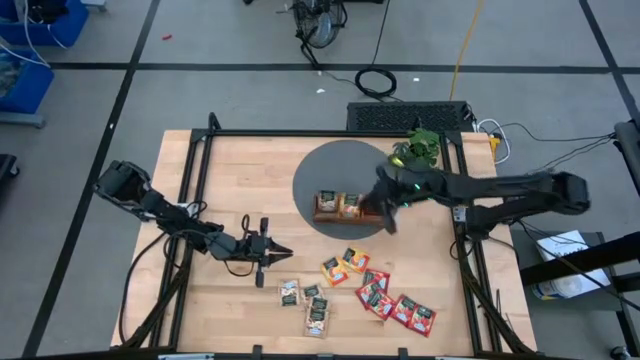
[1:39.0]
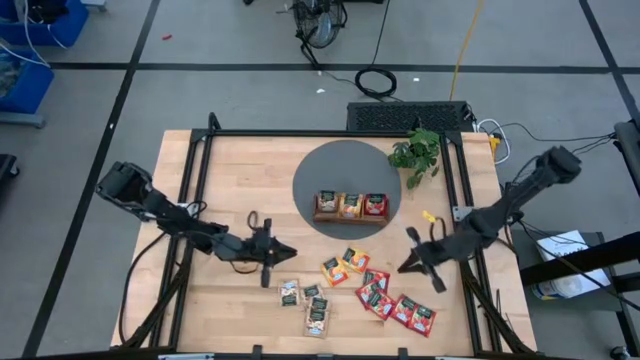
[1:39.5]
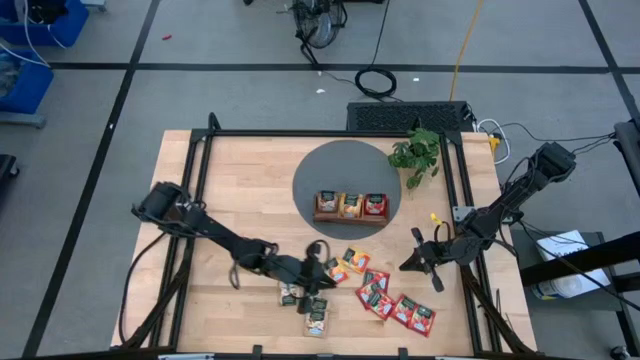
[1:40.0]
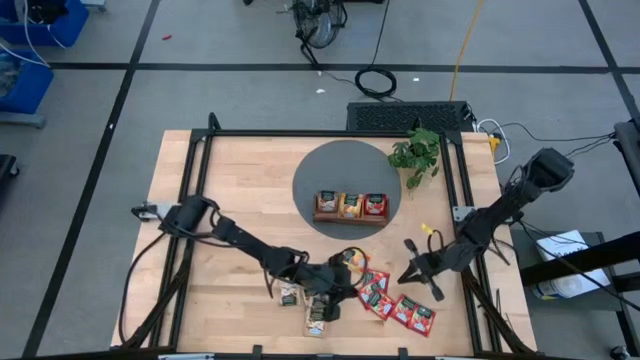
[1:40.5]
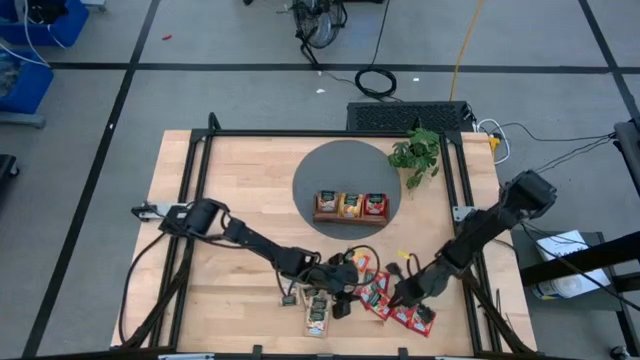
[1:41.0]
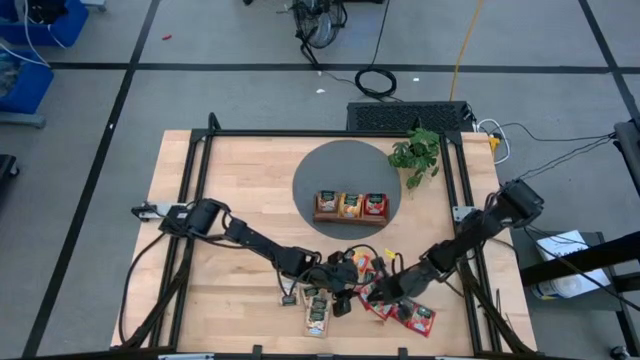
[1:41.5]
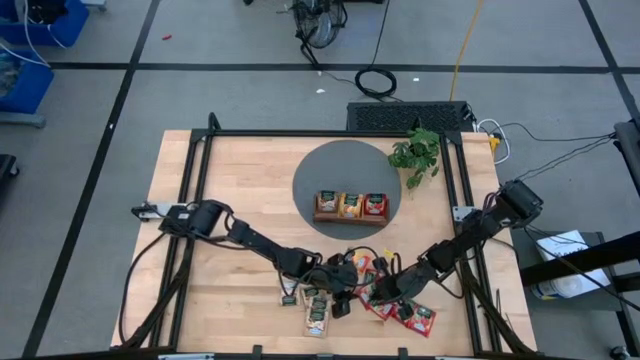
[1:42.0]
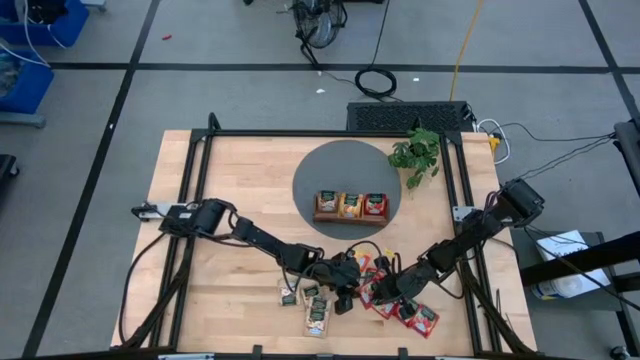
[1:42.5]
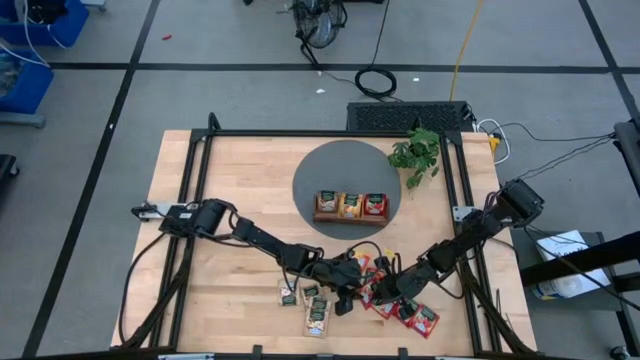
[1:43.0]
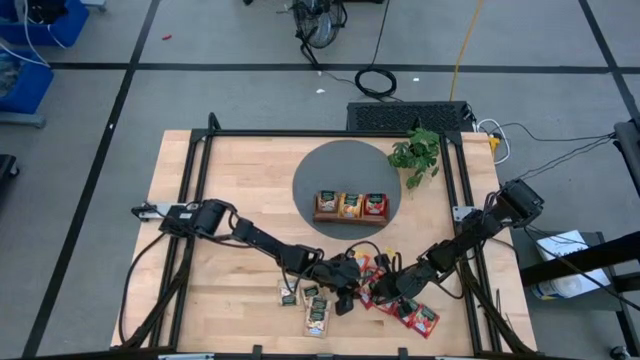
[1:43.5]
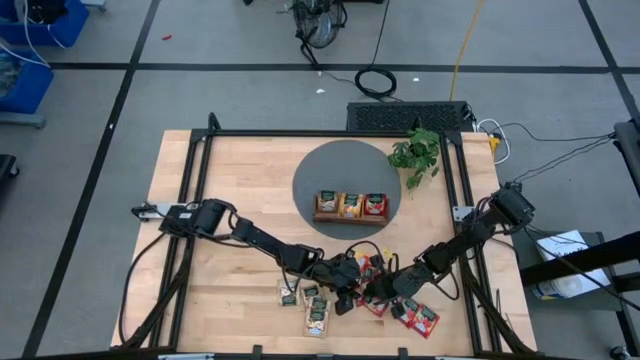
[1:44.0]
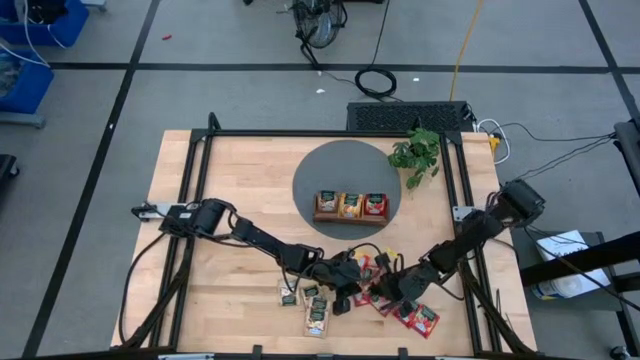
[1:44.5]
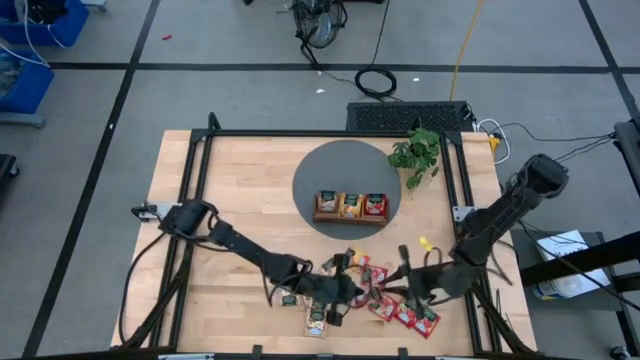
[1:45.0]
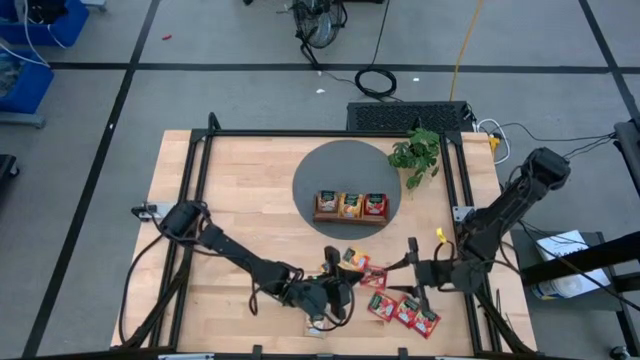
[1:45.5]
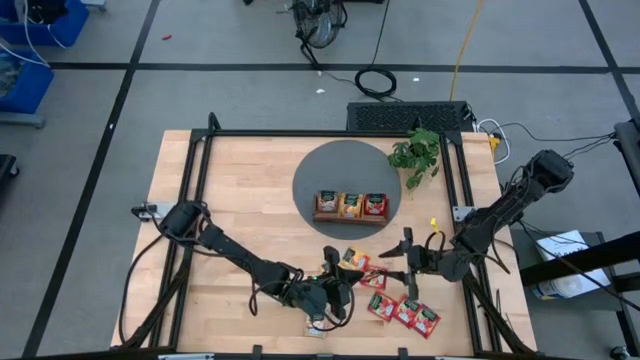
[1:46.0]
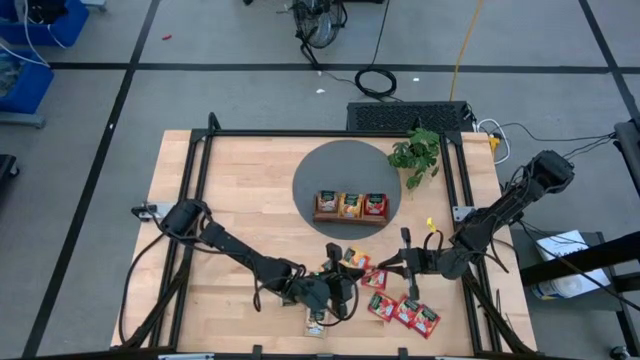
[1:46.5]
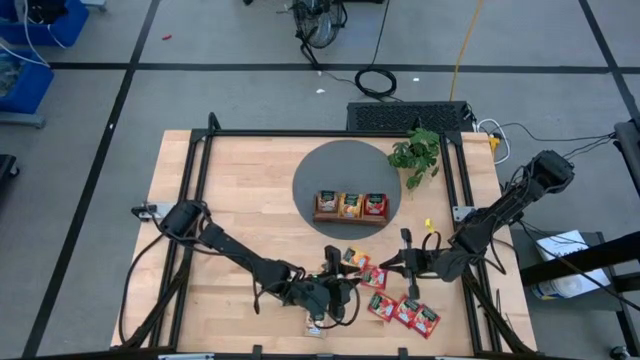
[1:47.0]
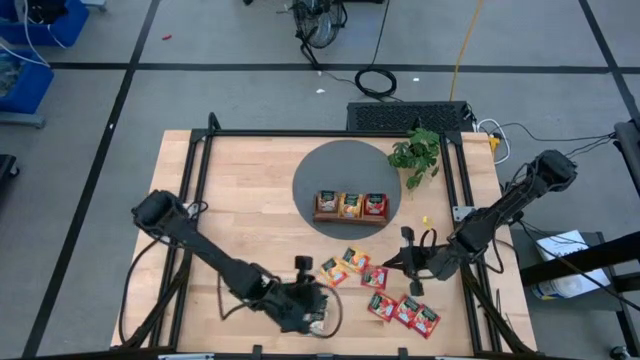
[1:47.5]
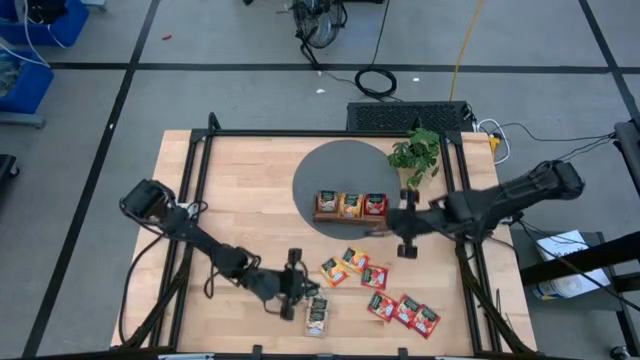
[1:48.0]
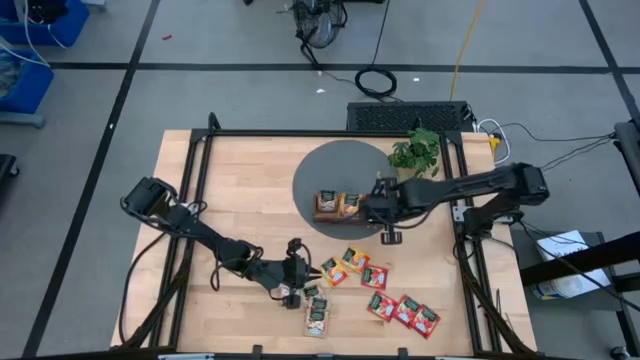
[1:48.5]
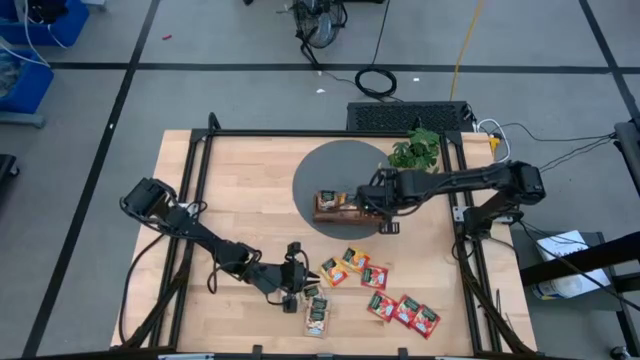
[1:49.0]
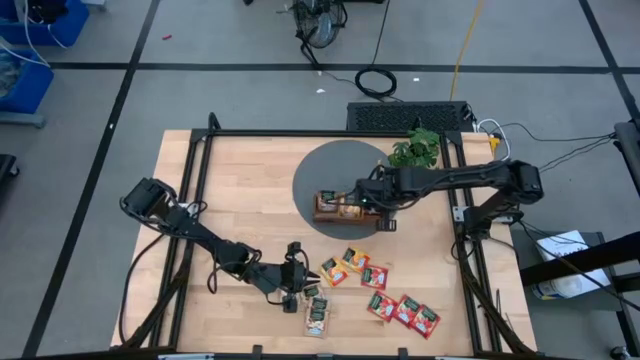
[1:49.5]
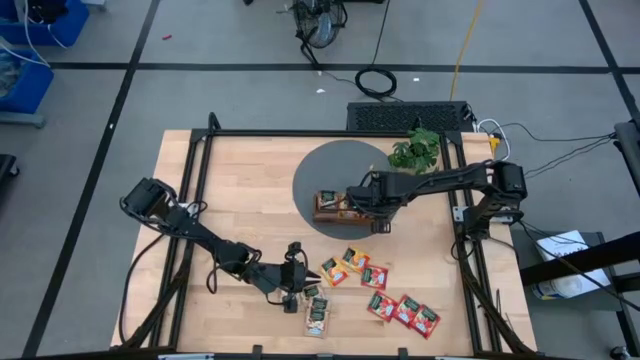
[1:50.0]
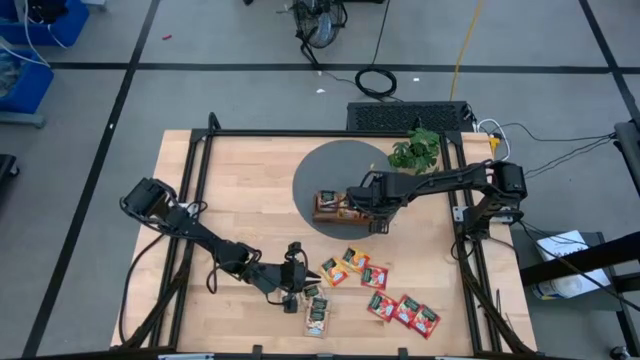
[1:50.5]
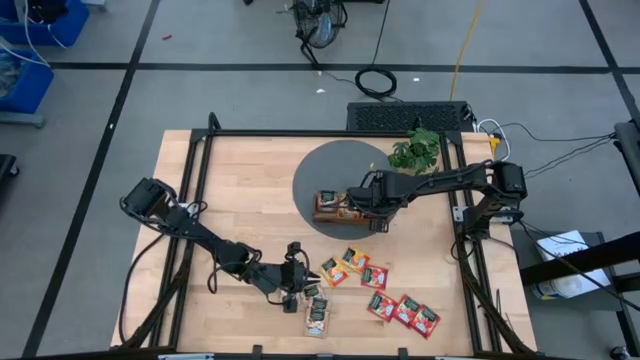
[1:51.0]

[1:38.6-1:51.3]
Task: Pick & Place Tea
Put the red tea bag into the right section of the wooden organiser

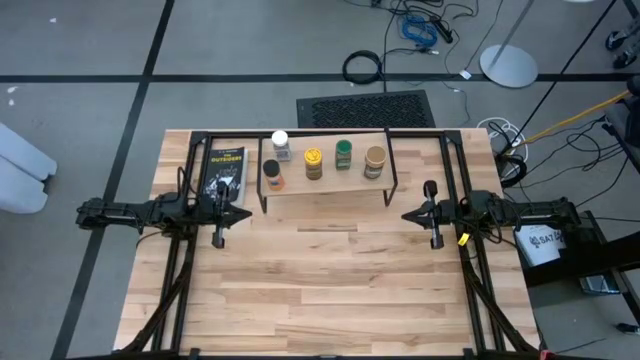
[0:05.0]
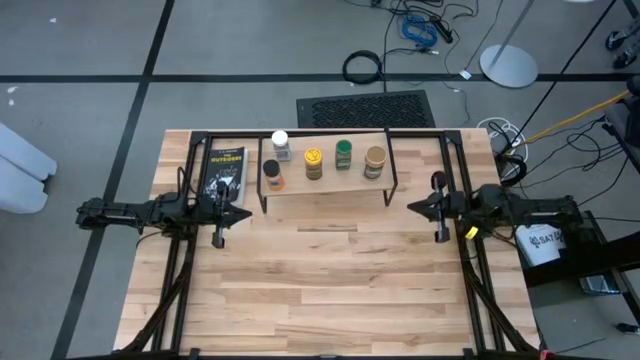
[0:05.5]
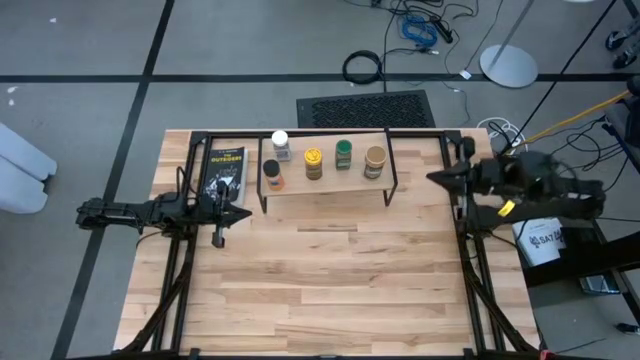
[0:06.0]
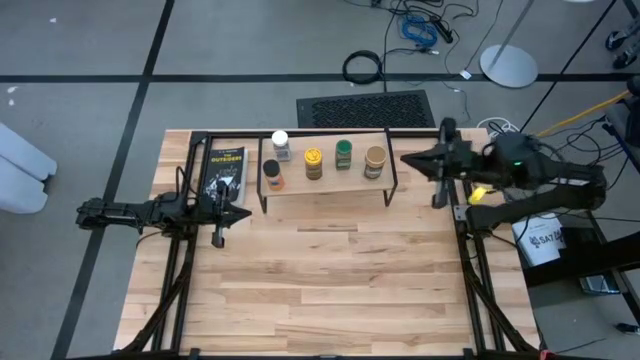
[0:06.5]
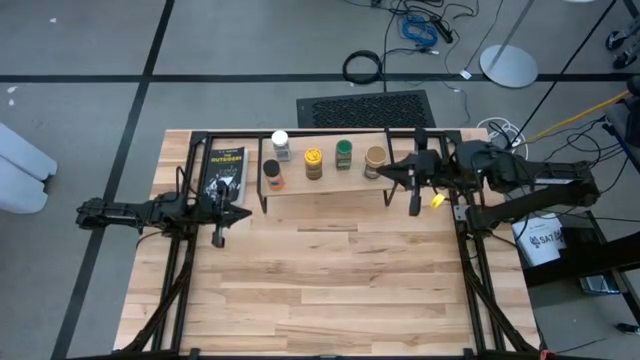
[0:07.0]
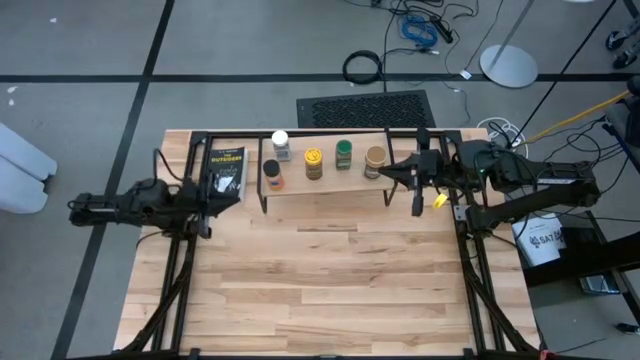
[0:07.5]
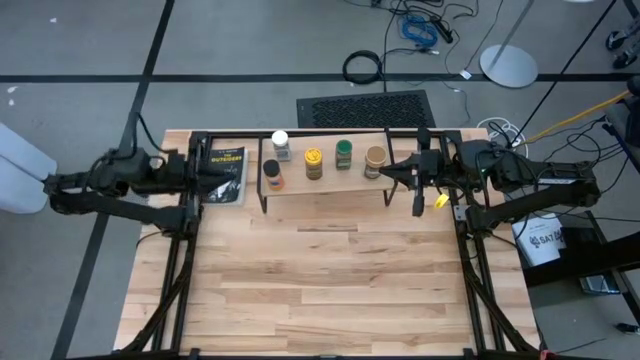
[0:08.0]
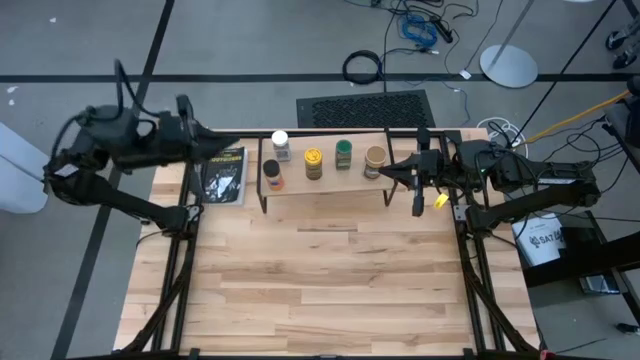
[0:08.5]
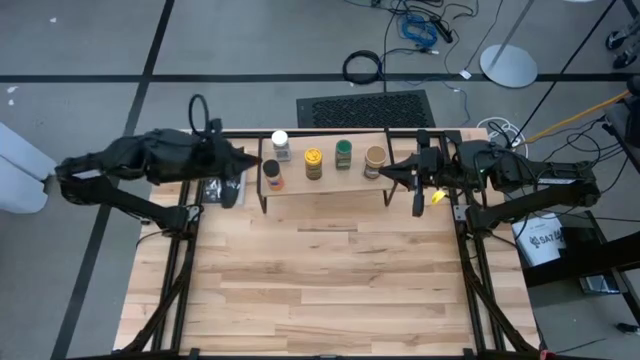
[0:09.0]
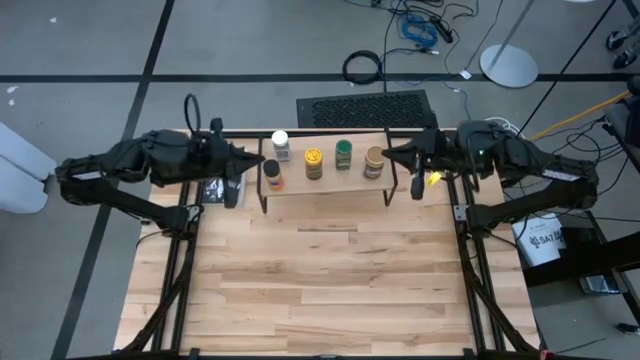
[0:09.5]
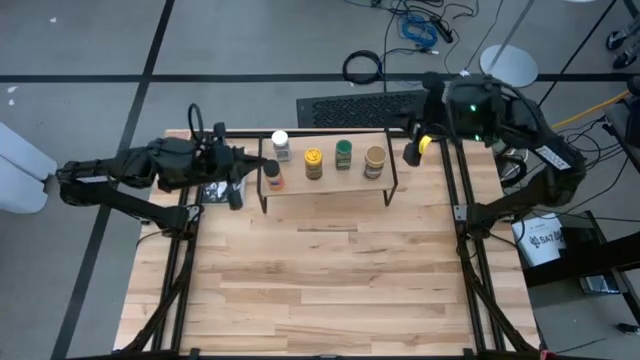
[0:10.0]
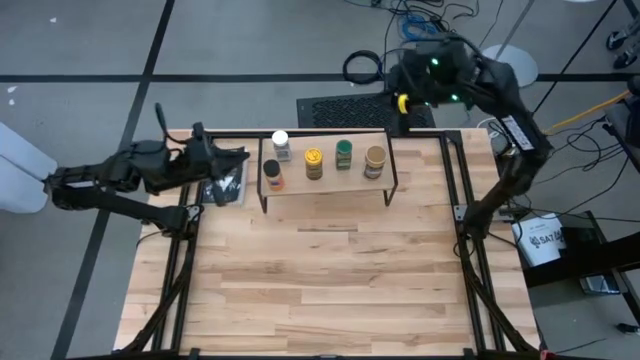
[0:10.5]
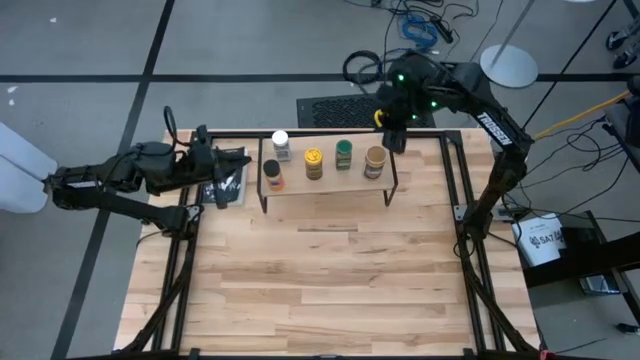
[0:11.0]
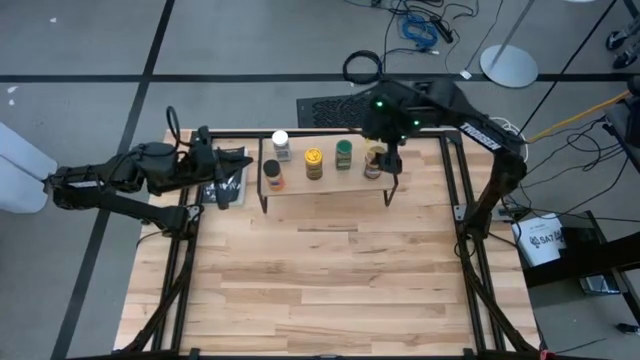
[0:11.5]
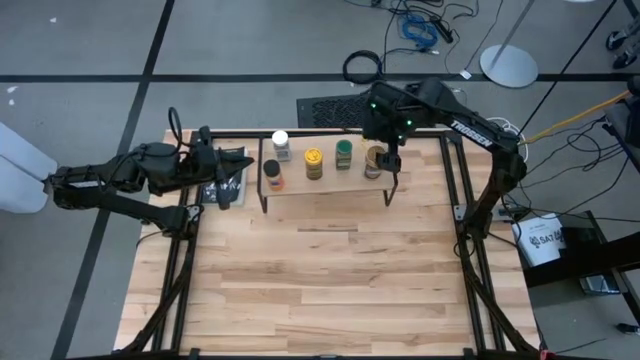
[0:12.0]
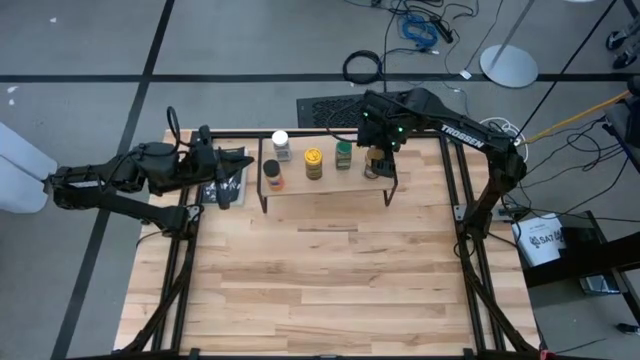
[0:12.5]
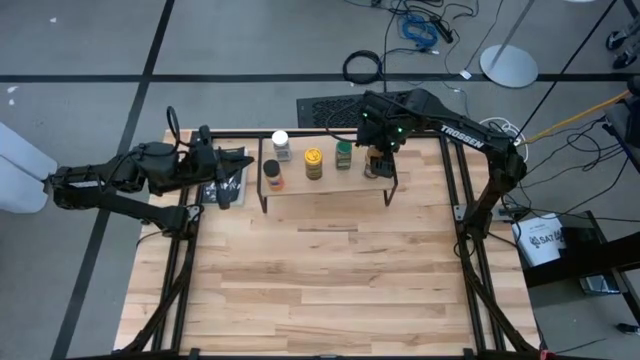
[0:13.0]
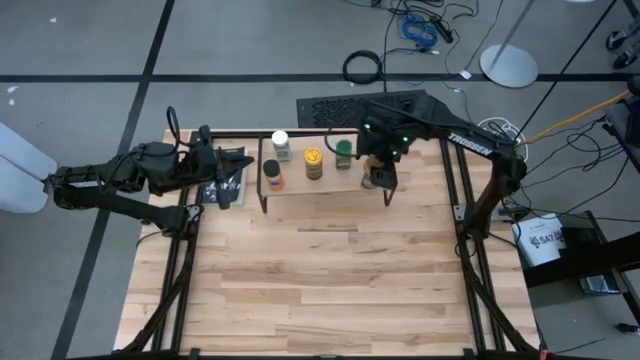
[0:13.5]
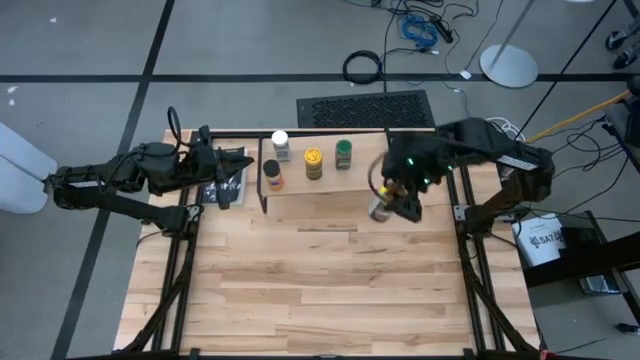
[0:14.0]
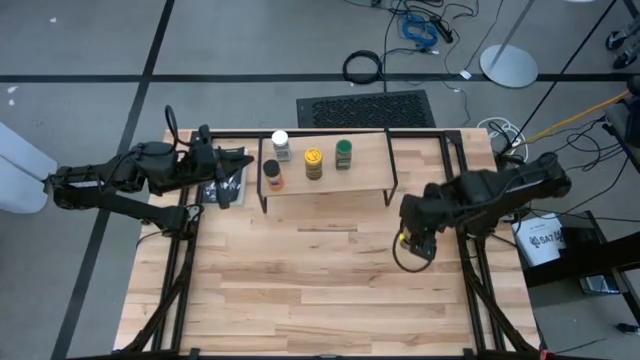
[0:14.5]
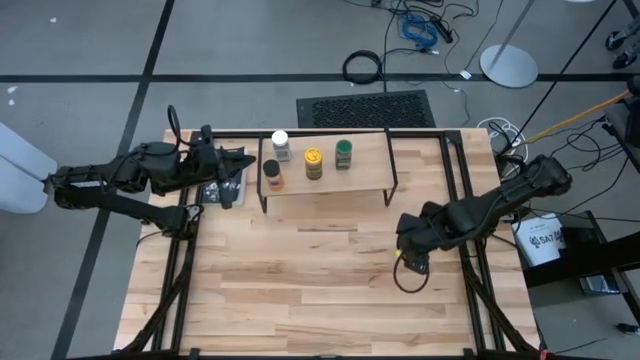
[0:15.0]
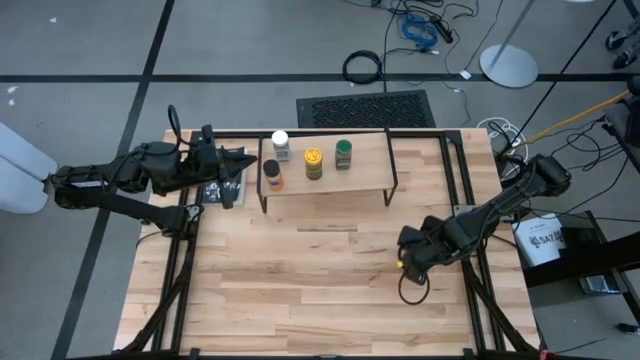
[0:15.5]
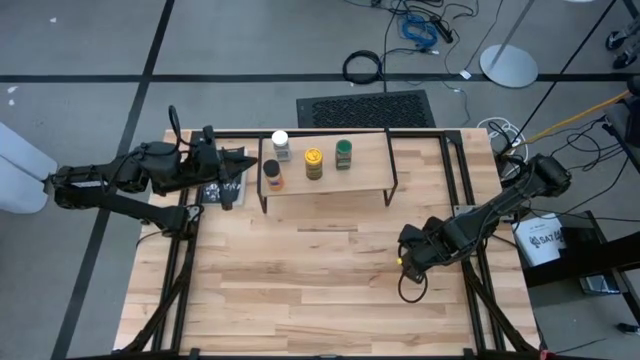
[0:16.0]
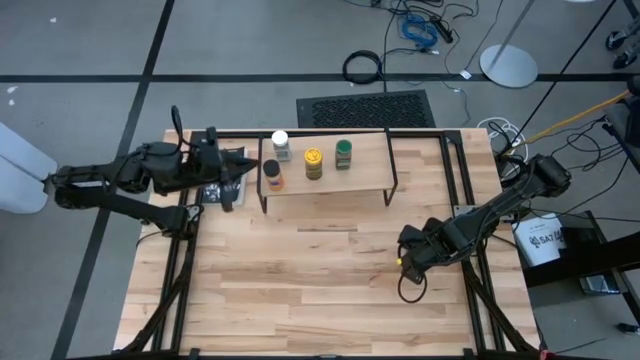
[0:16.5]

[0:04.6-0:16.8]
Task: Shelf spices
Remove the brown seasoning bottle from the shelf
